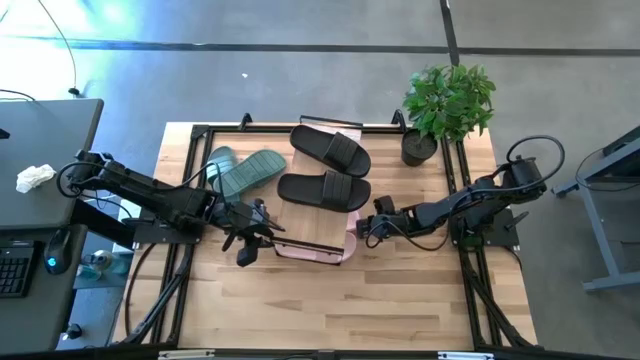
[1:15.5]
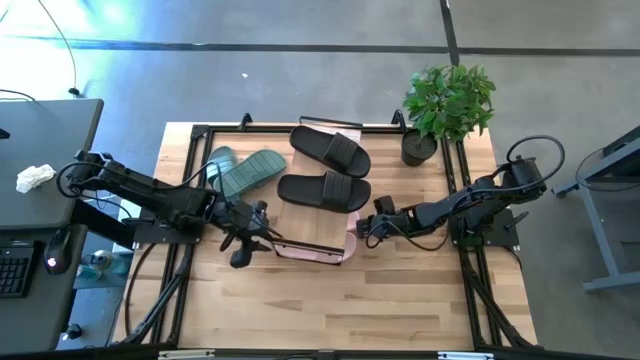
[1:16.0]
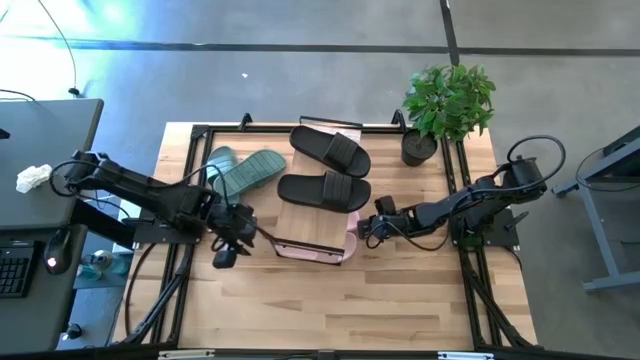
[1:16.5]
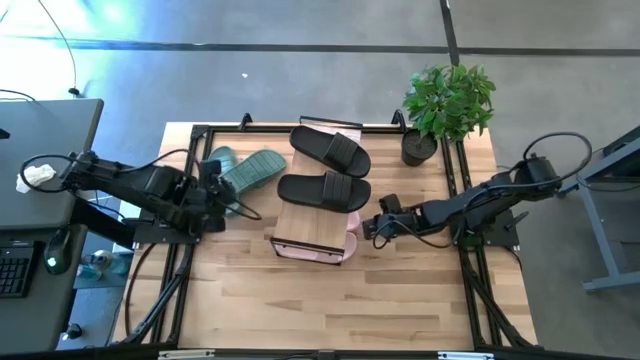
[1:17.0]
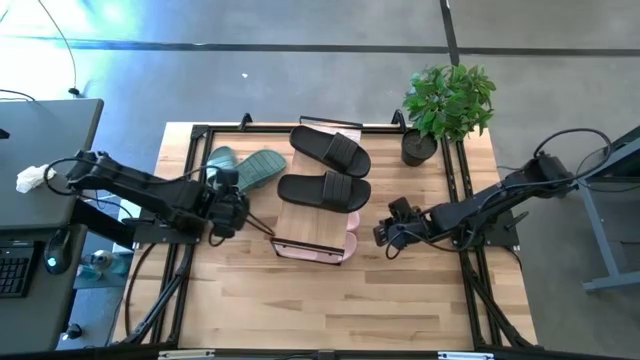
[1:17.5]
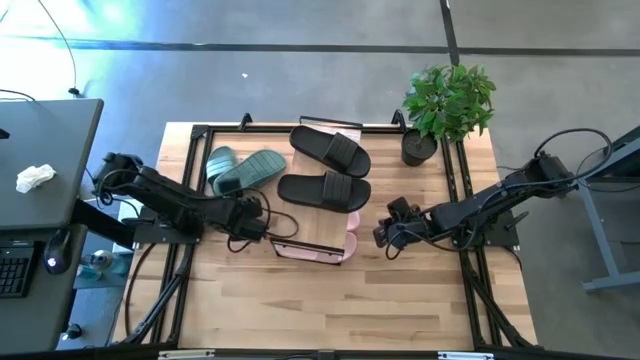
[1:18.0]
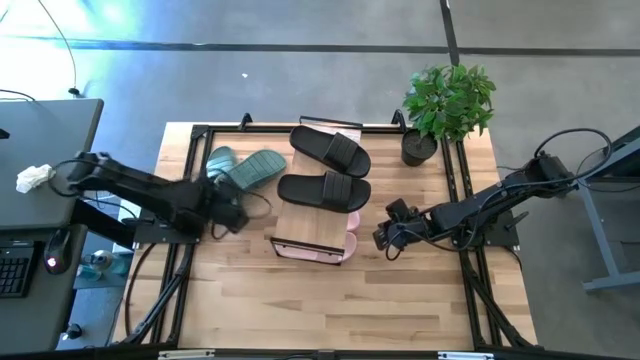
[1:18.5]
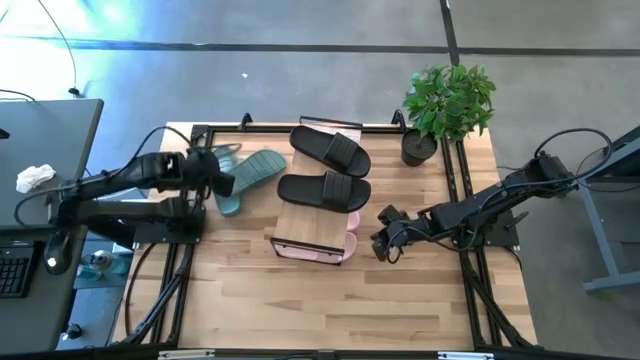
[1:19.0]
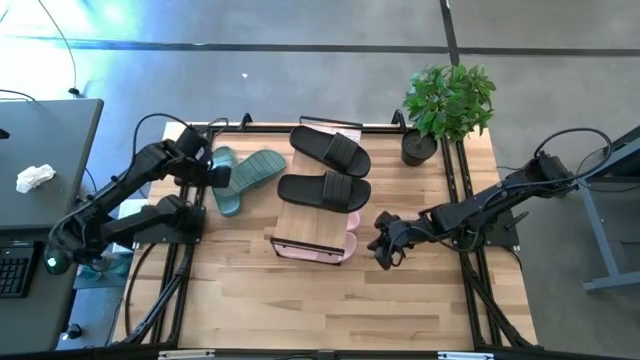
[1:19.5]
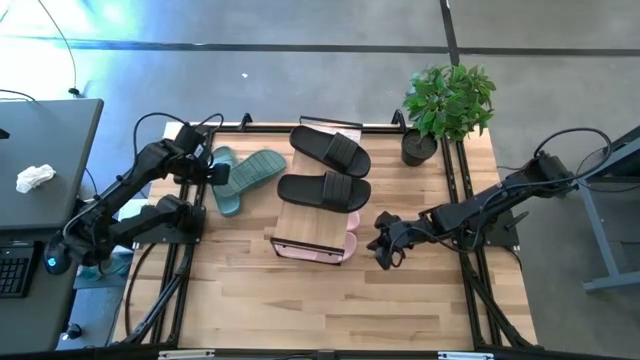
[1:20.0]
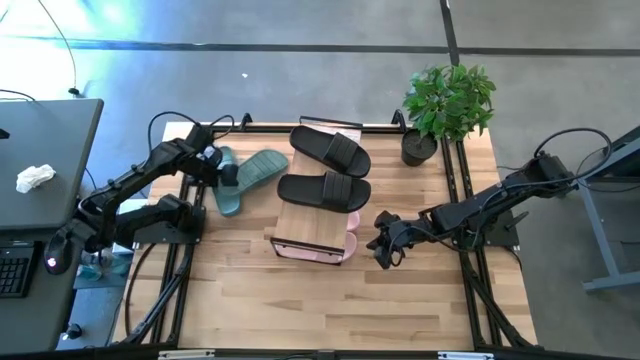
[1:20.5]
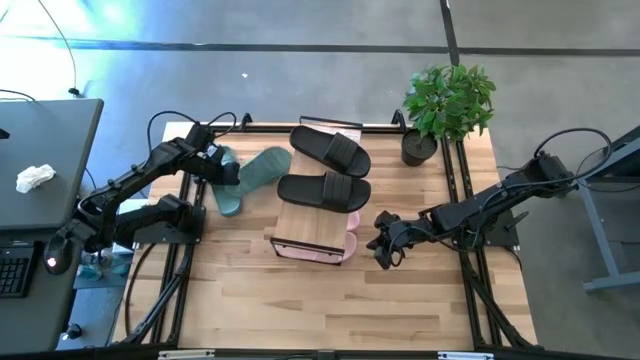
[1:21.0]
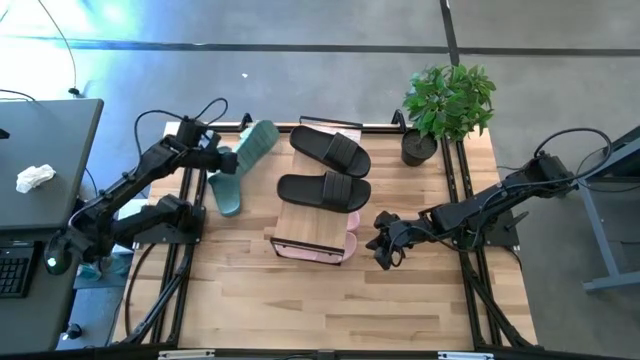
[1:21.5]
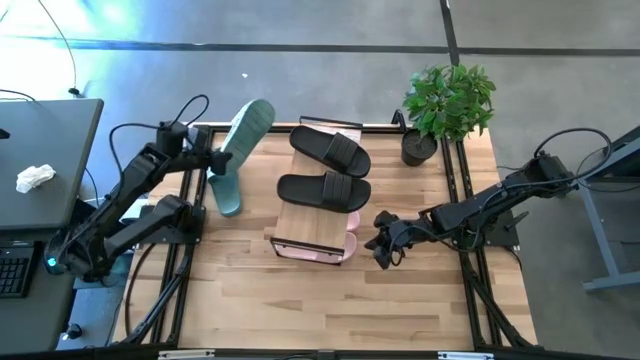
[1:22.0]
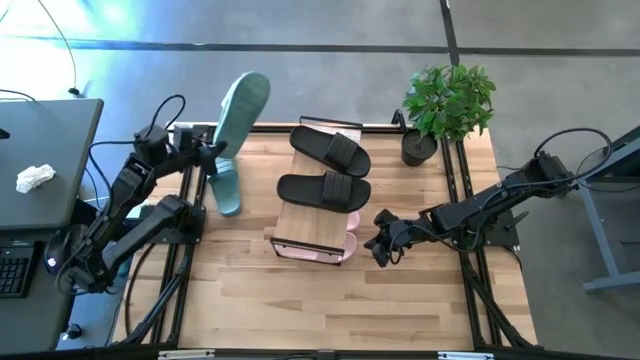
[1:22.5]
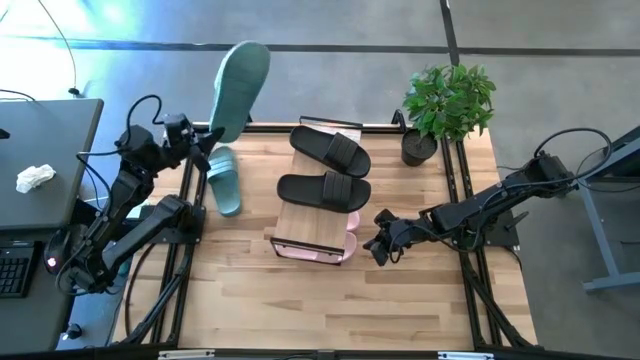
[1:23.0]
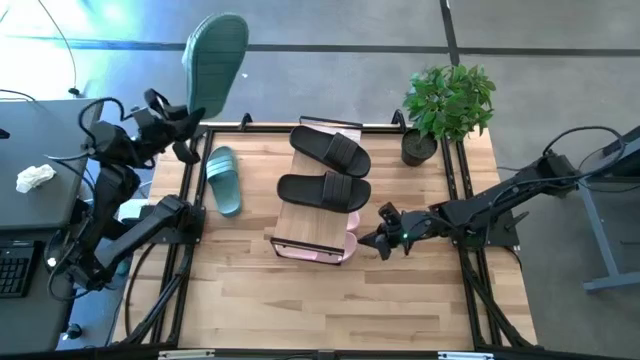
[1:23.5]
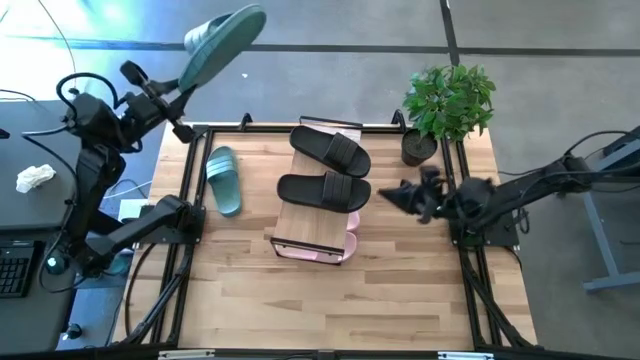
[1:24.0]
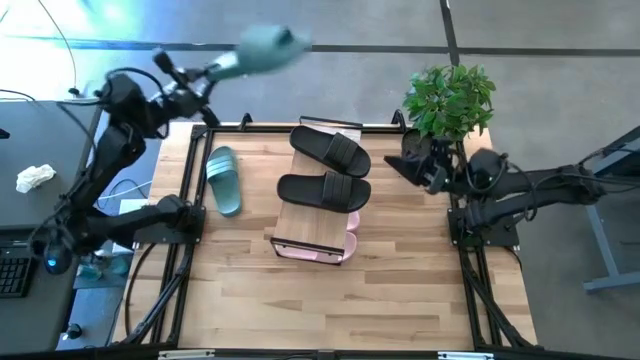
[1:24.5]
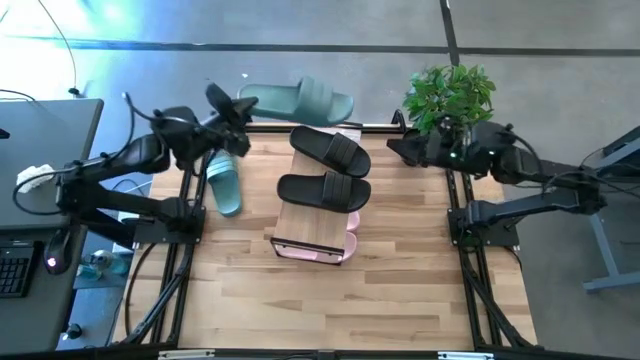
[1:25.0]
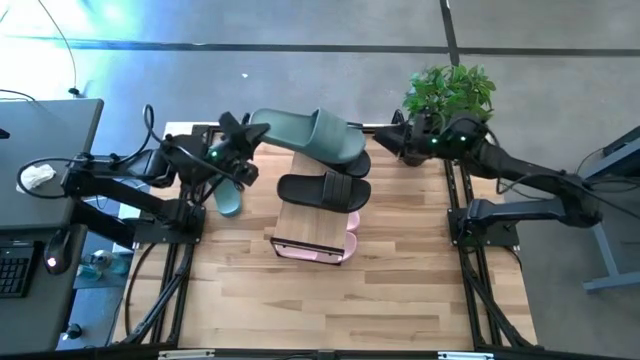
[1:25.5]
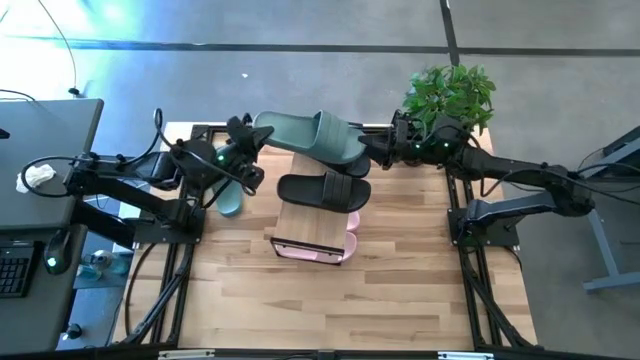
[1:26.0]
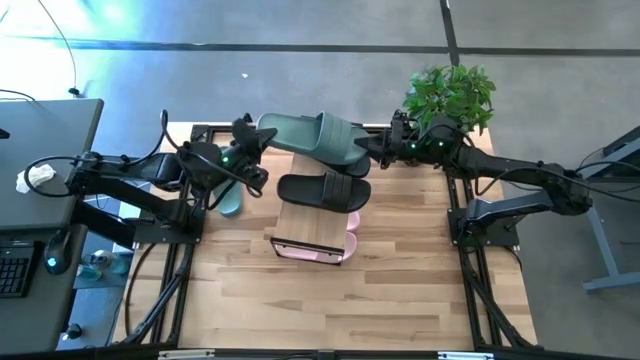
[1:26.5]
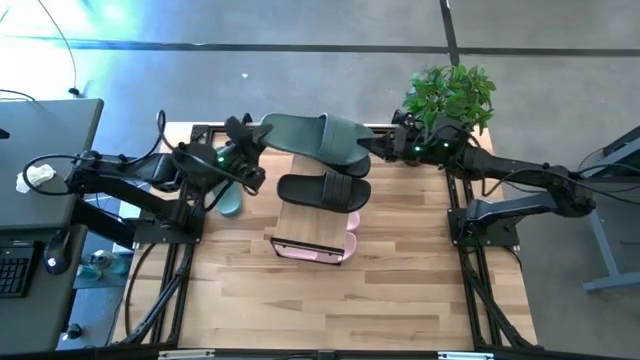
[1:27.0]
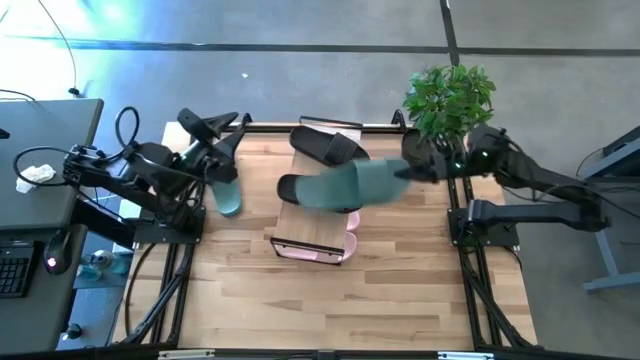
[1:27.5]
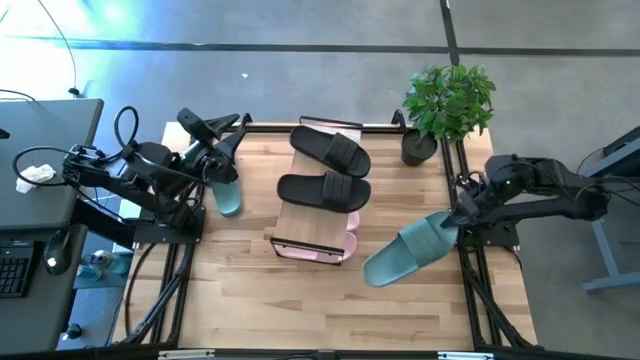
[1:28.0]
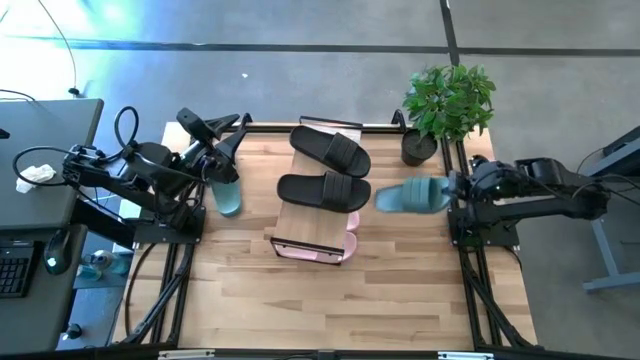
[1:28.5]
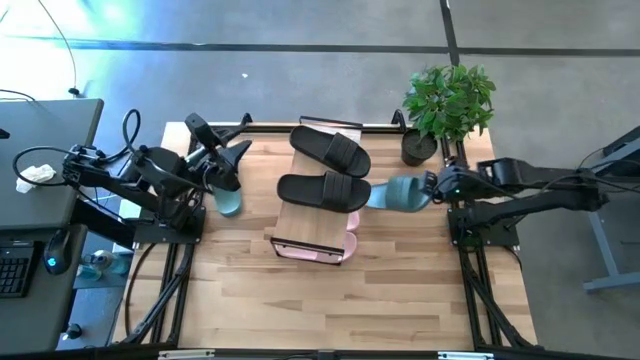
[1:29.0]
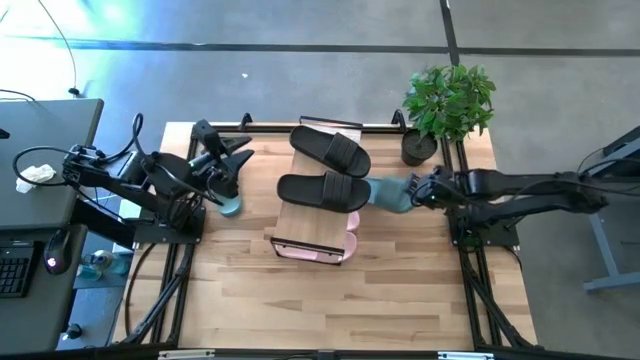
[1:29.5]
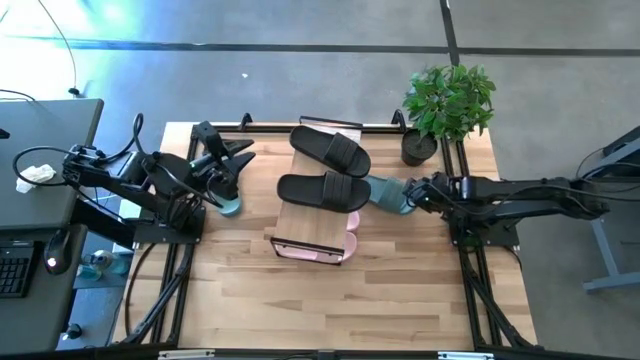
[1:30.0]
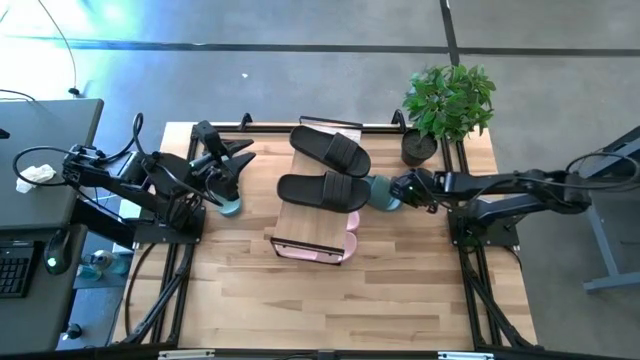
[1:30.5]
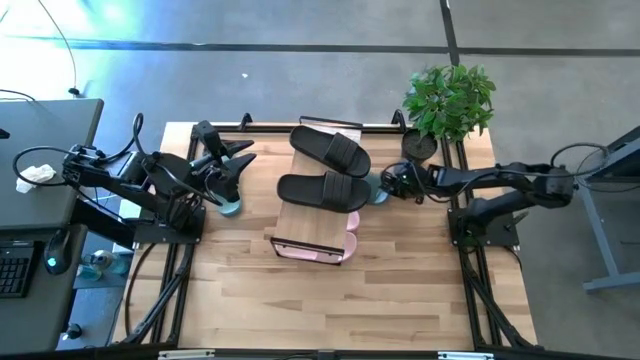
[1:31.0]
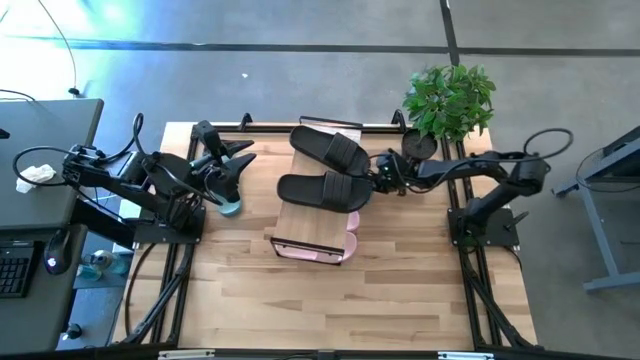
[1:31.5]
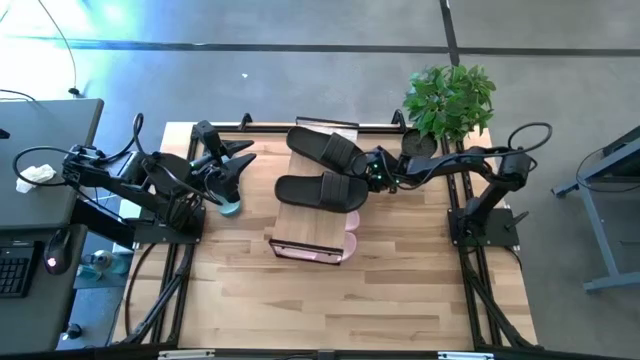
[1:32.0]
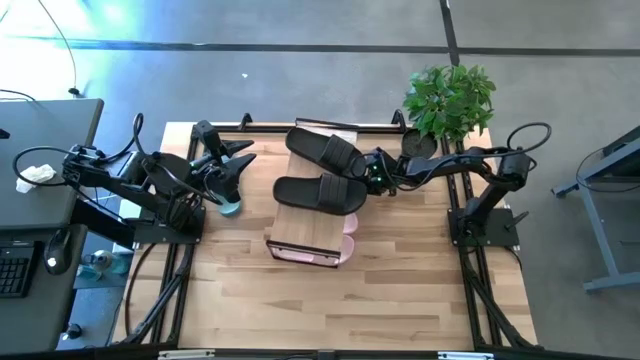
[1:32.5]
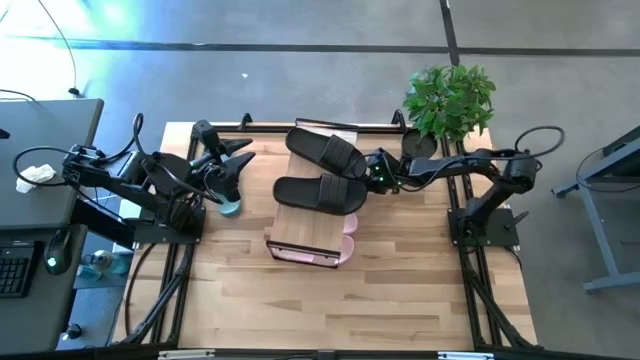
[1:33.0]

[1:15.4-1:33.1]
Task: Pick and place slides into the shelf
Put the right green slide under the shelf

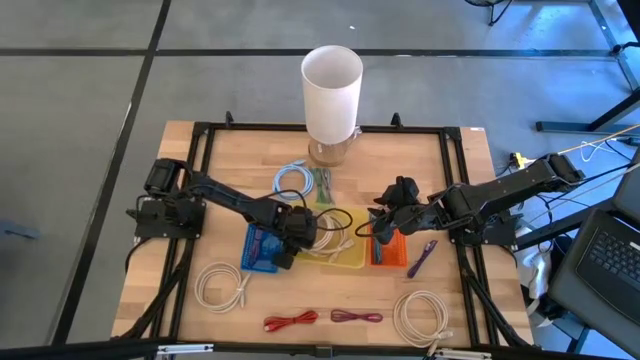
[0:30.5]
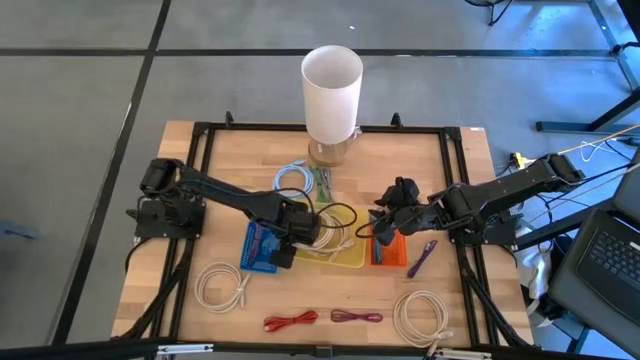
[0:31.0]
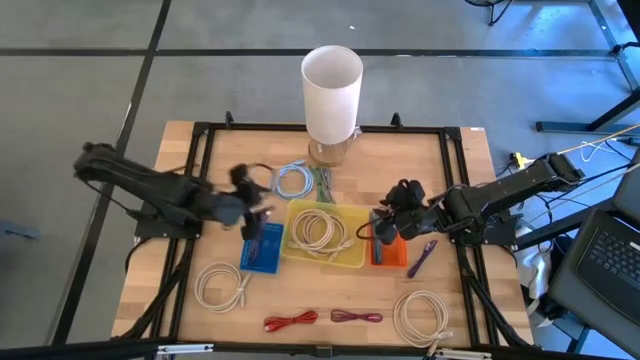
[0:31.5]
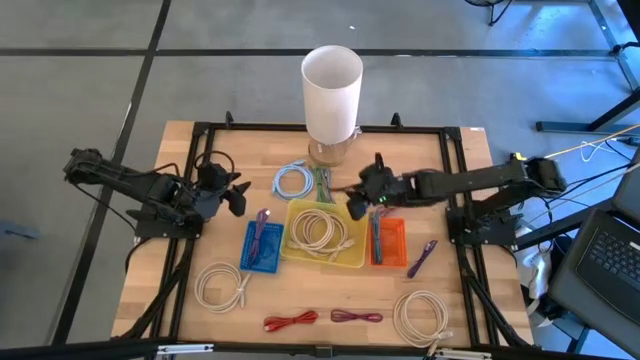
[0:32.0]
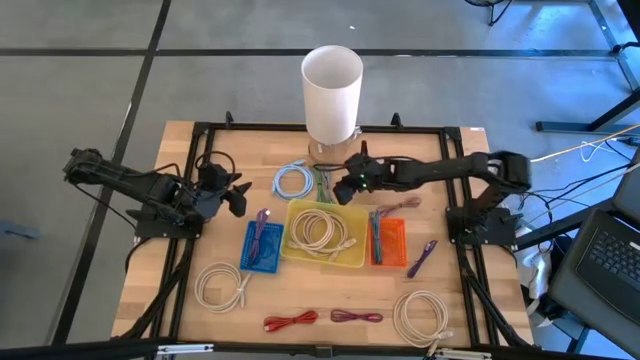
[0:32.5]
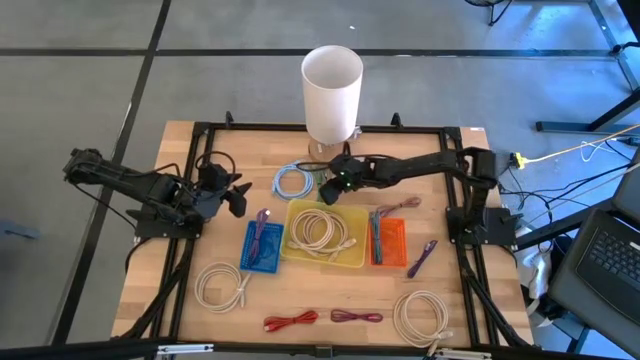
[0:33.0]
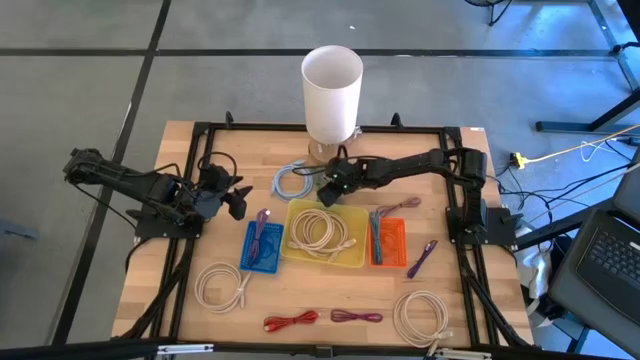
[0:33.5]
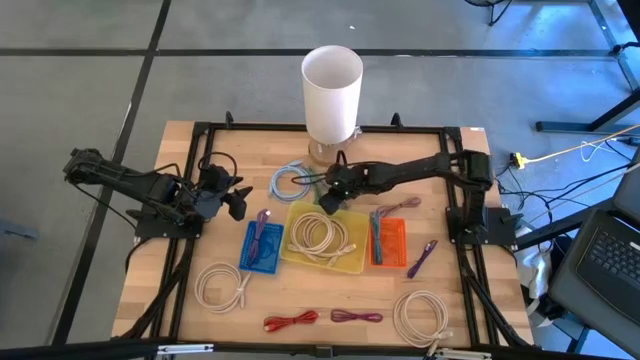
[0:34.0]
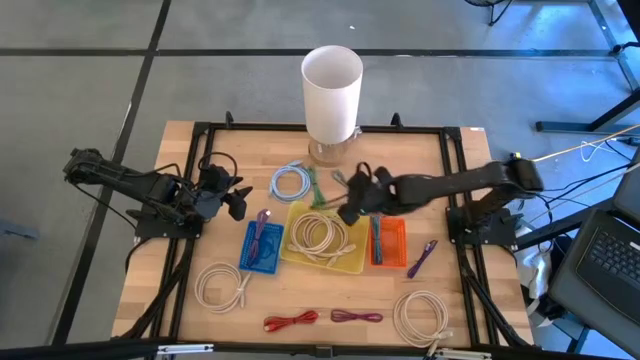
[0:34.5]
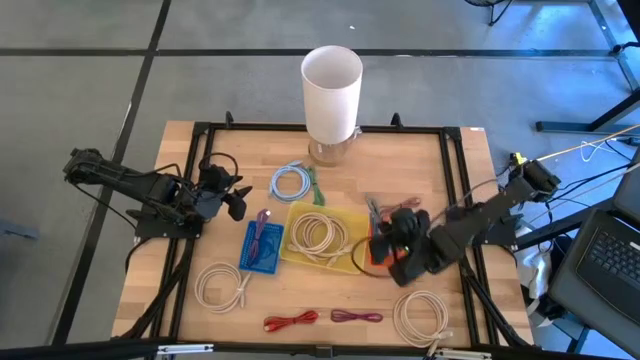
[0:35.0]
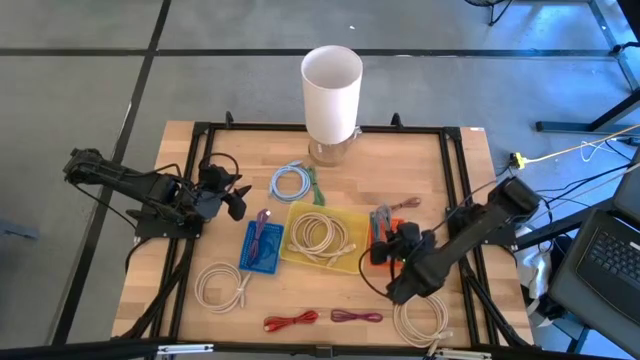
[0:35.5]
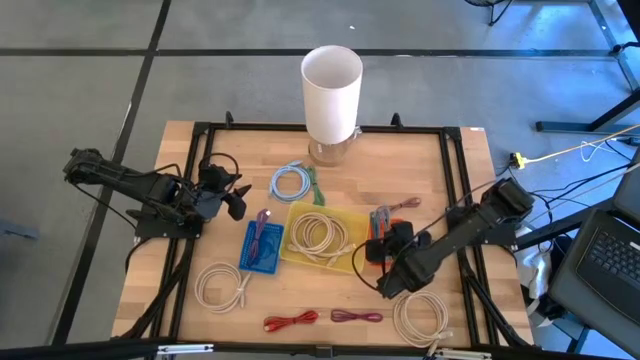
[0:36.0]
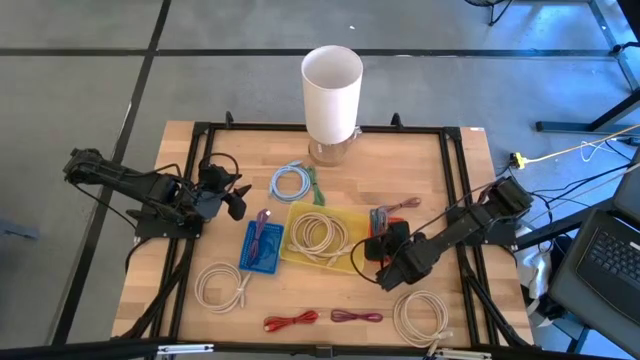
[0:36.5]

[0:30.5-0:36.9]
Task: Pick & Place USB Port
Put the white and black charger cable into the orange bin
